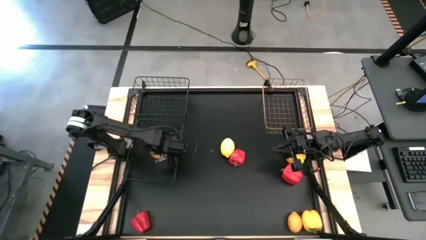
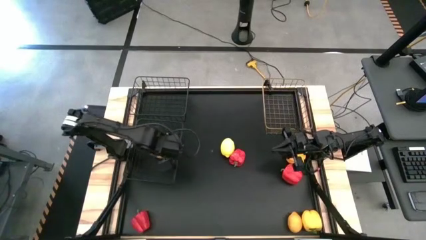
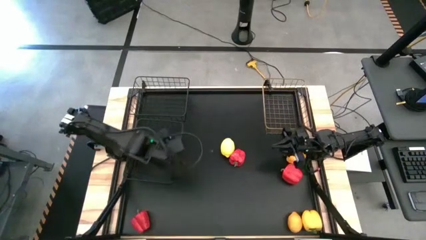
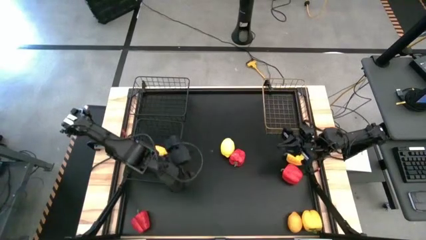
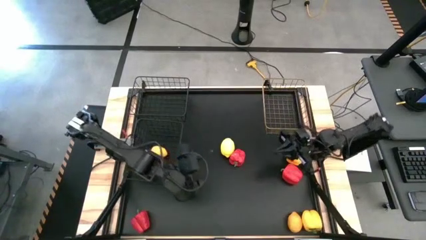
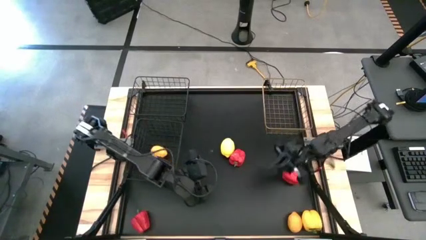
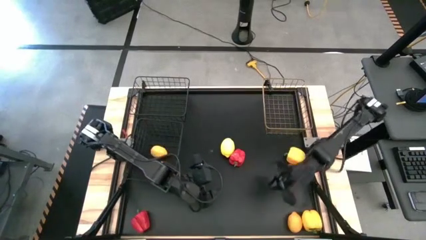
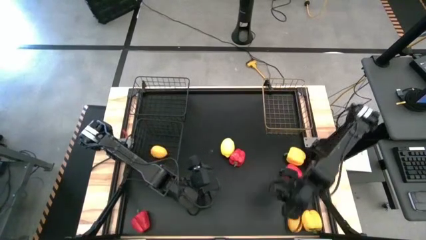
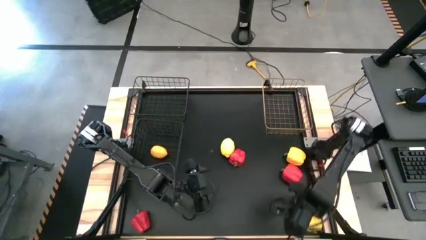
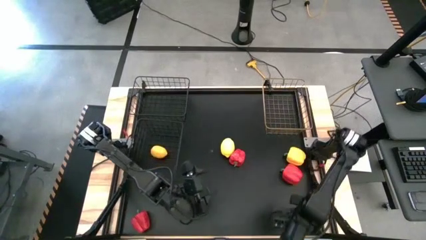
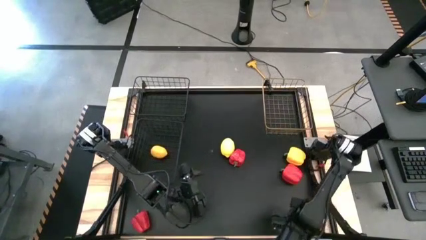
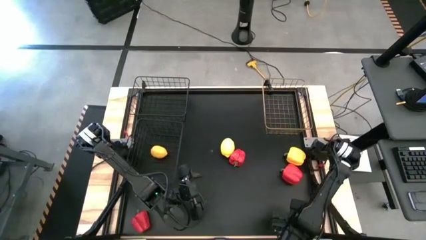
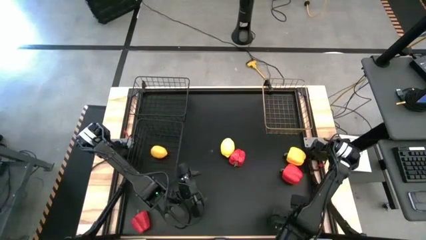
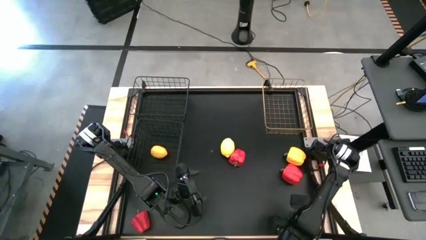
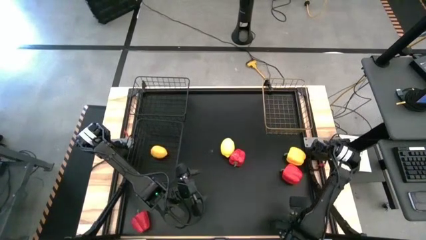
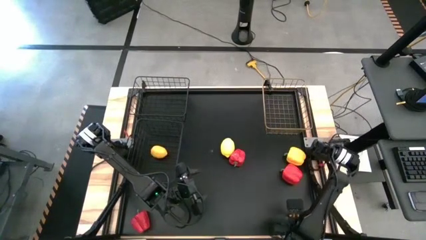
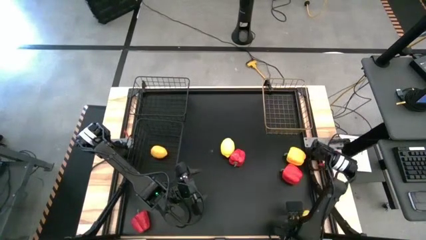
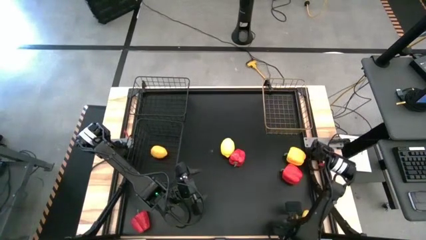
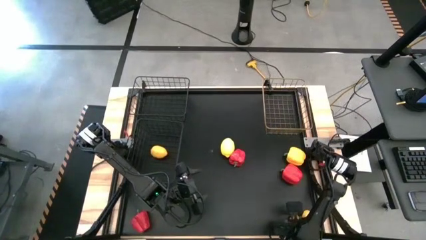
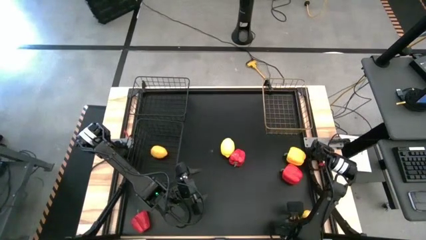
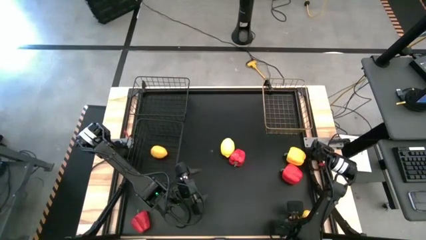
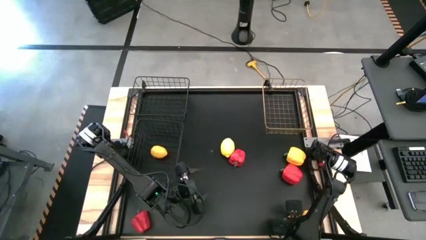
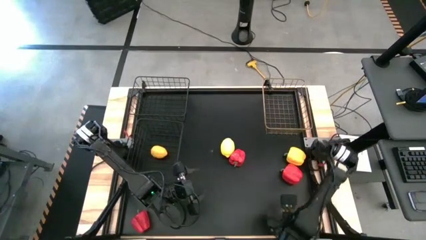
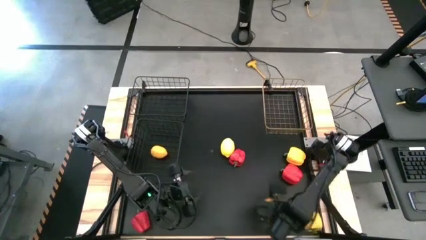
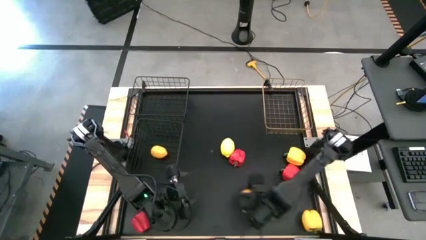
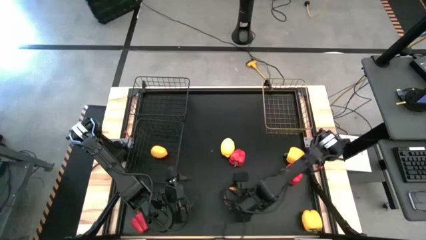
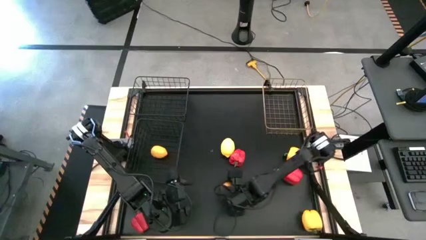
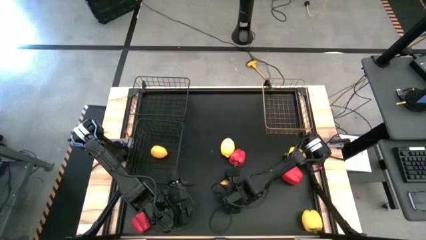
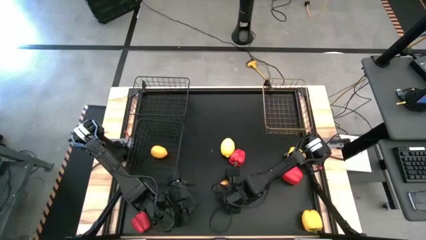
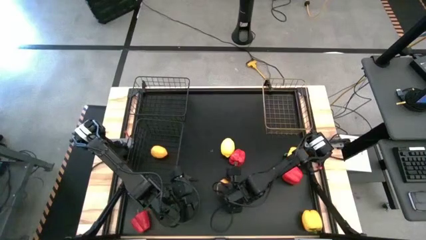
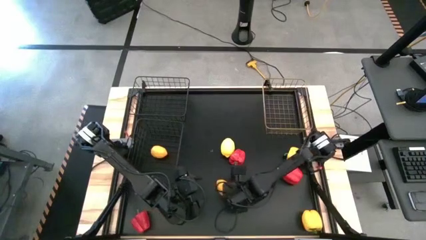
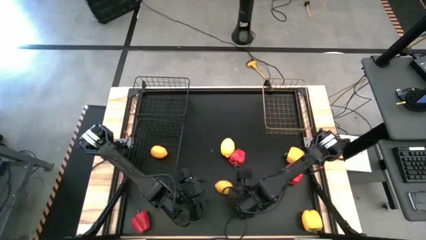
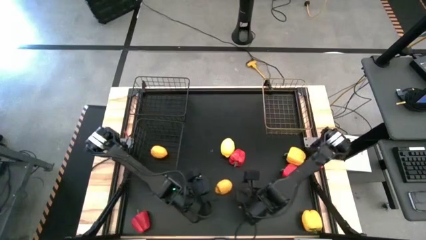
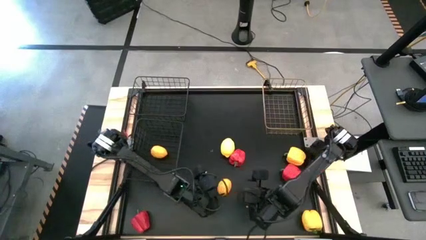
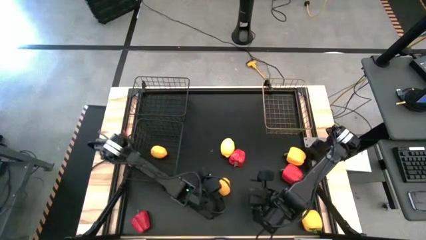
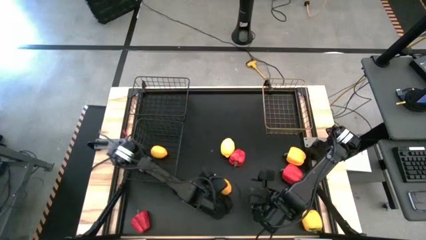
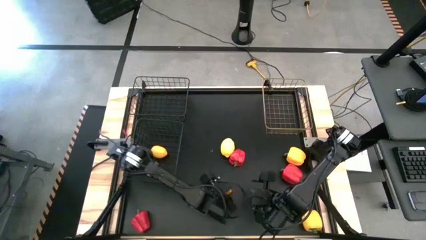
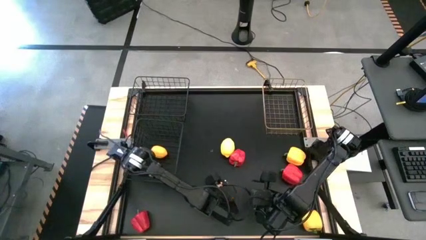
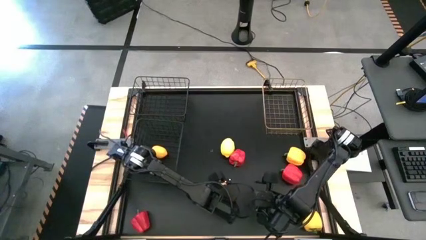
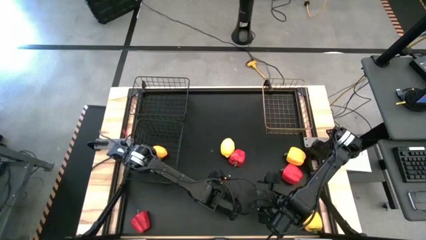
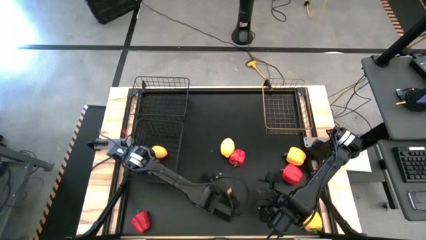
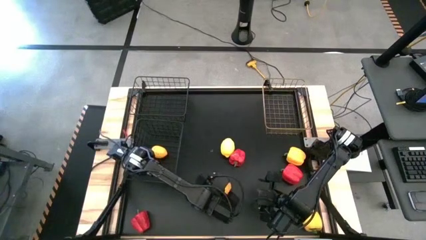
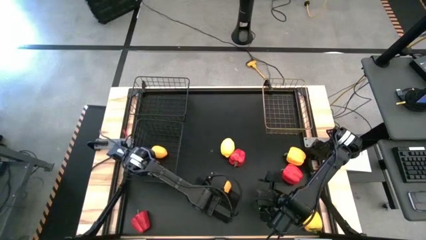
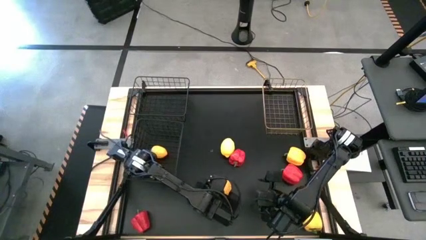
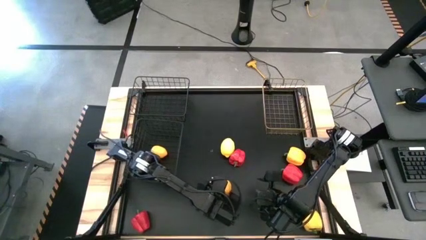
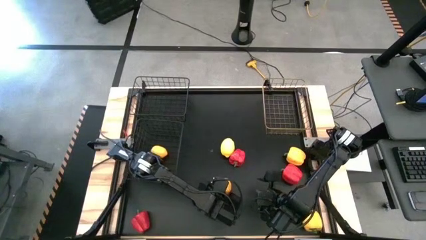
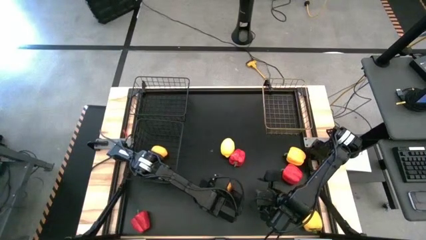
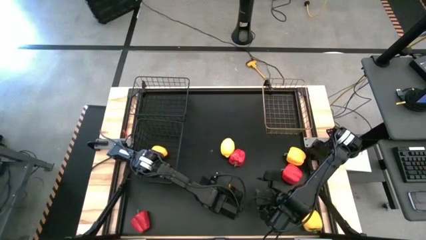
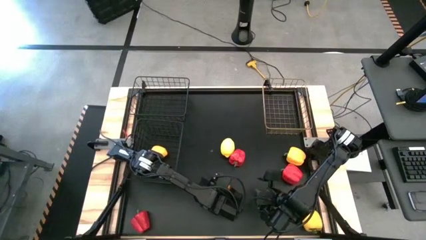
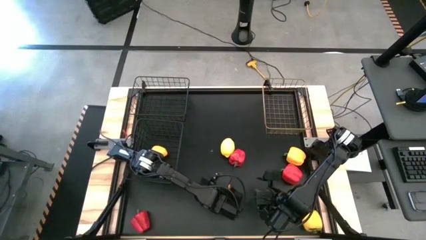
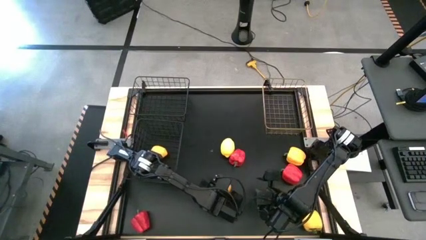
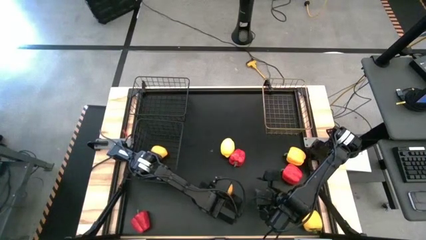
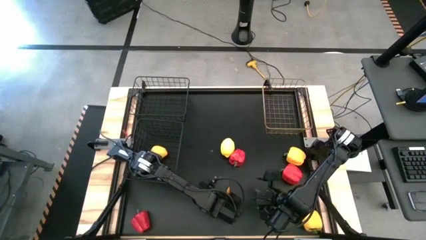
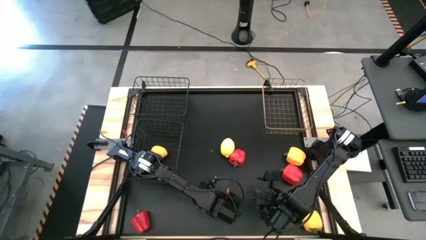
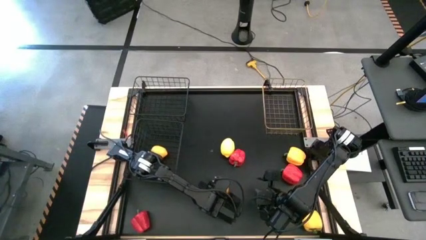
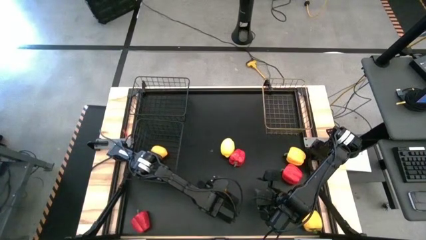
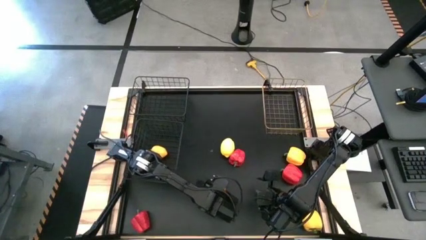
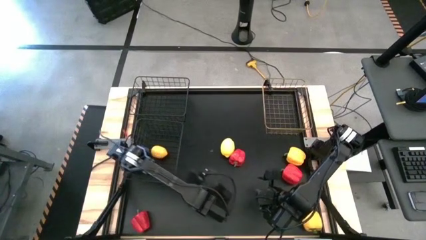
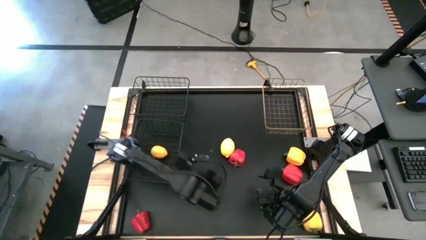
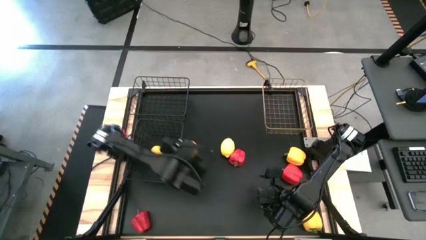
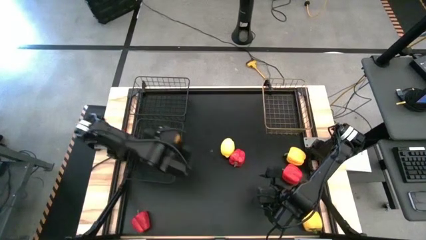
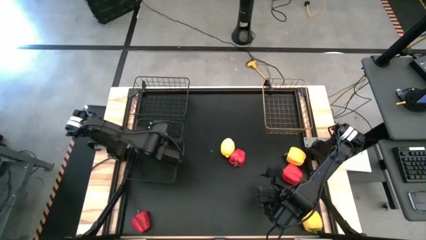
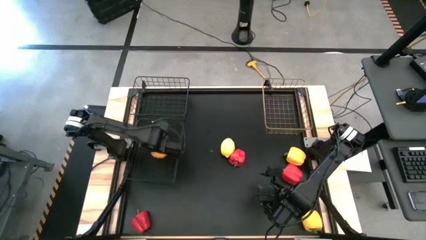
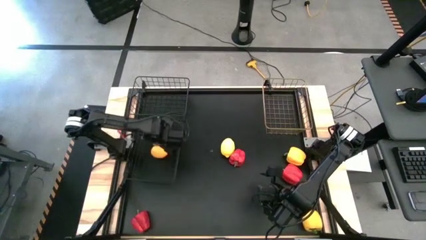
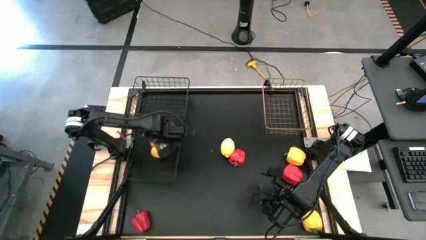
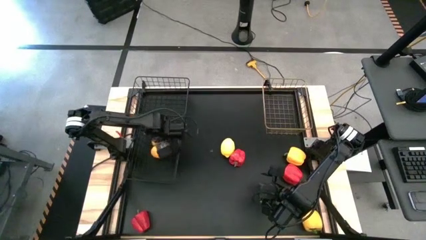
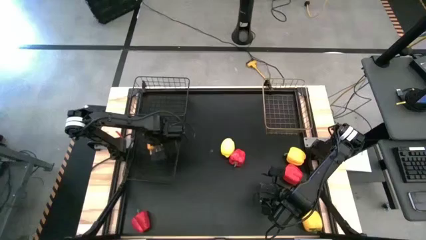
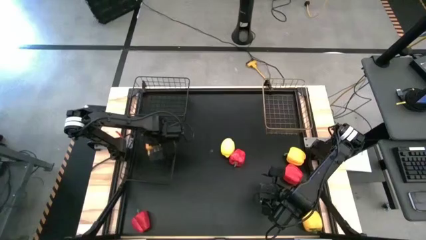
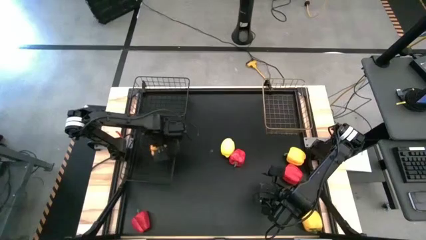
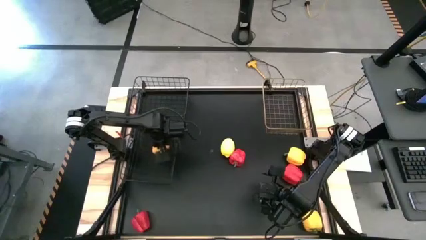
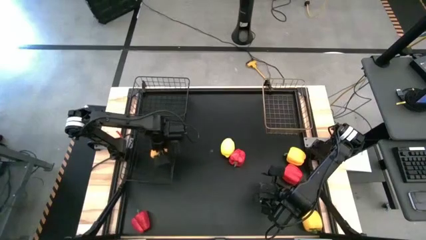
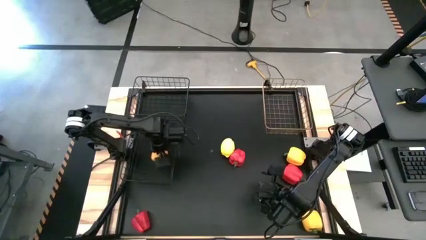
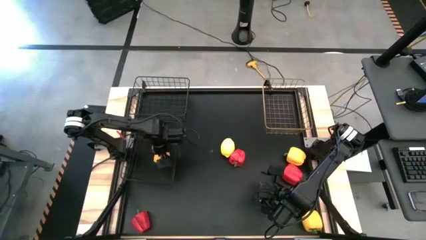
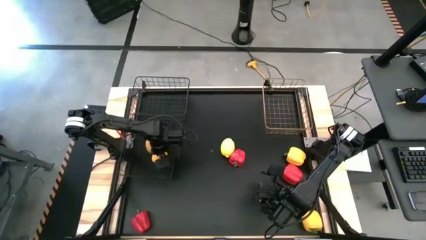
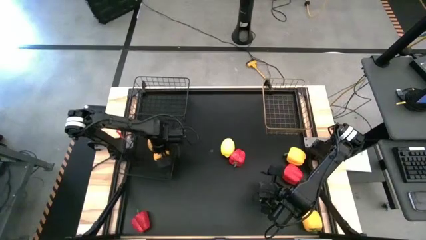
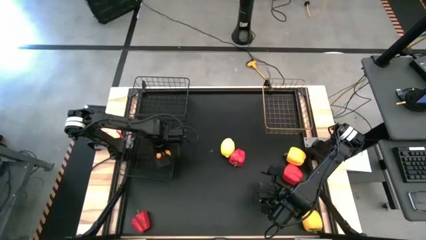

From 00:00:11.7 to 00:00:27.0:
Task: Sort produce into baskets
Put the bottom lemon into the bottom black wire basket
